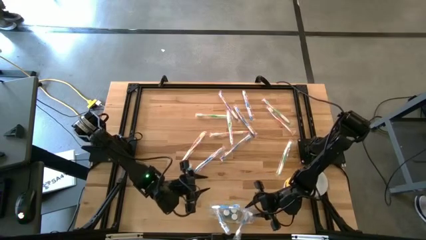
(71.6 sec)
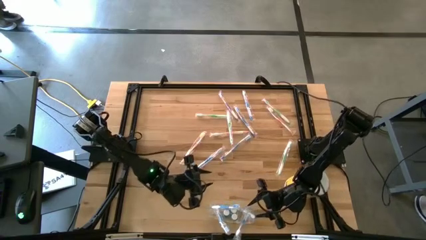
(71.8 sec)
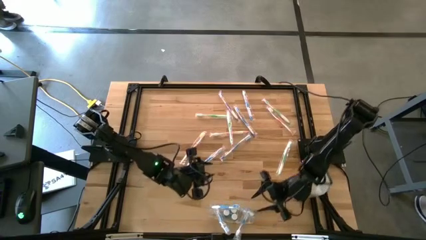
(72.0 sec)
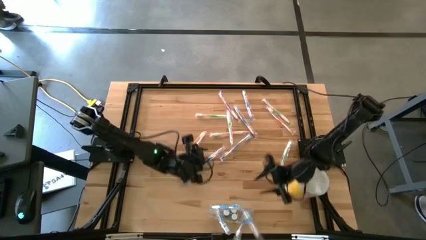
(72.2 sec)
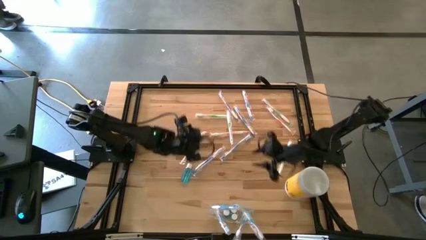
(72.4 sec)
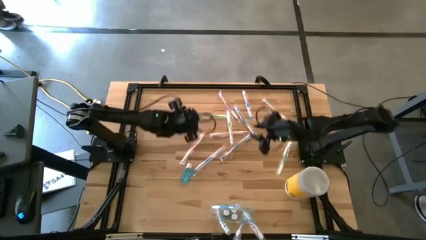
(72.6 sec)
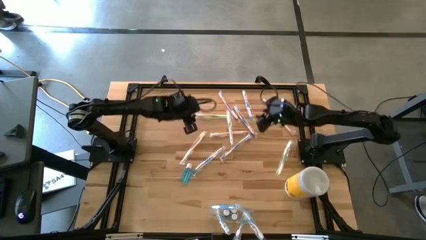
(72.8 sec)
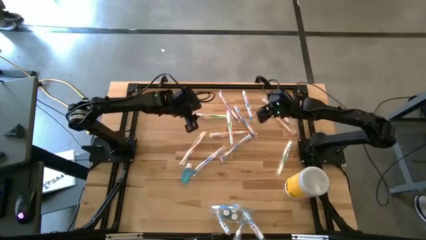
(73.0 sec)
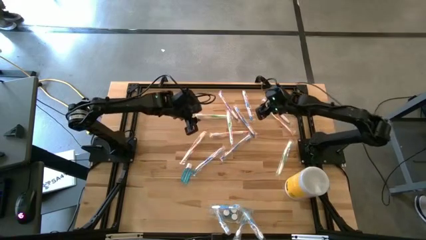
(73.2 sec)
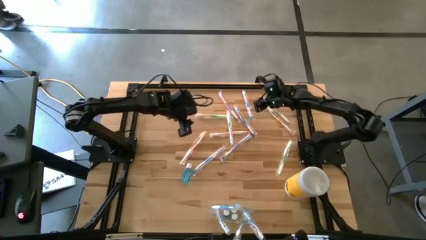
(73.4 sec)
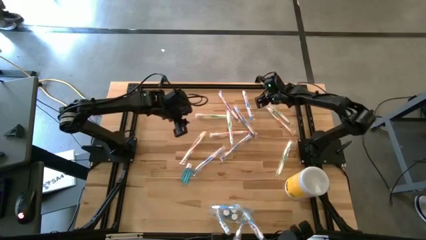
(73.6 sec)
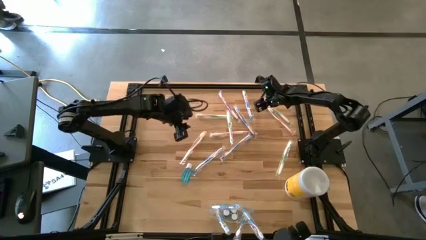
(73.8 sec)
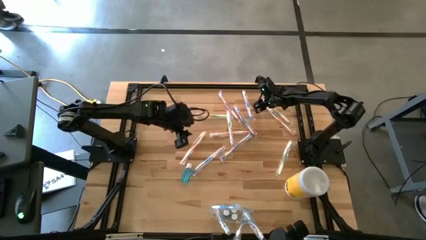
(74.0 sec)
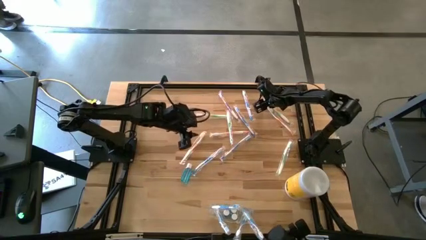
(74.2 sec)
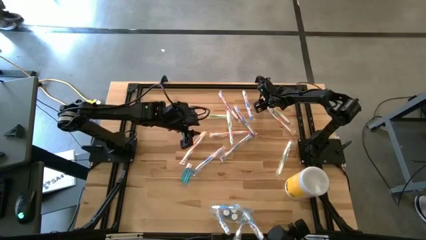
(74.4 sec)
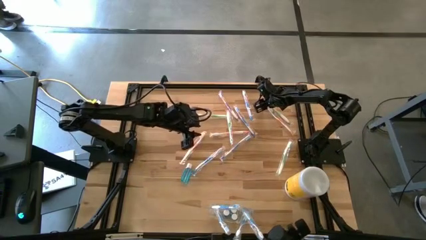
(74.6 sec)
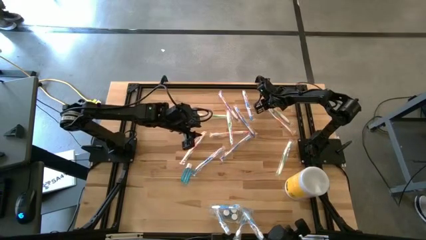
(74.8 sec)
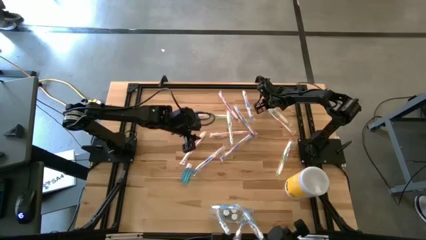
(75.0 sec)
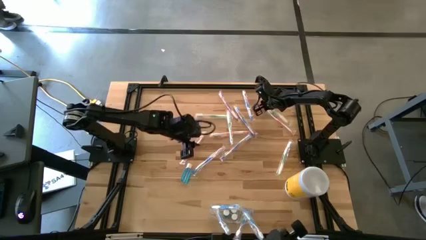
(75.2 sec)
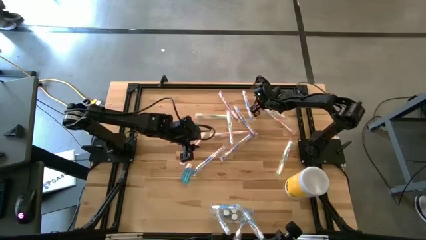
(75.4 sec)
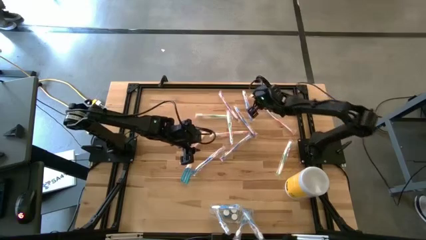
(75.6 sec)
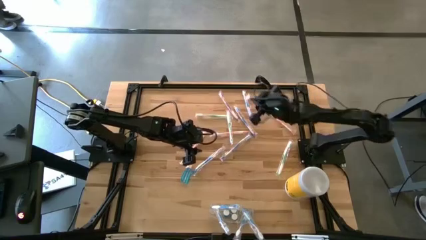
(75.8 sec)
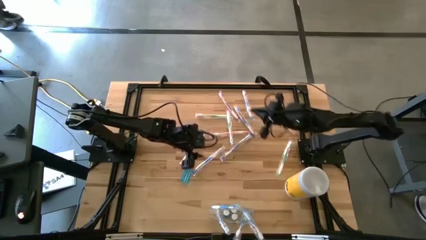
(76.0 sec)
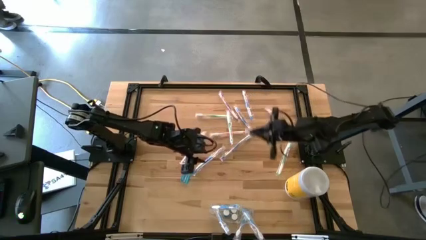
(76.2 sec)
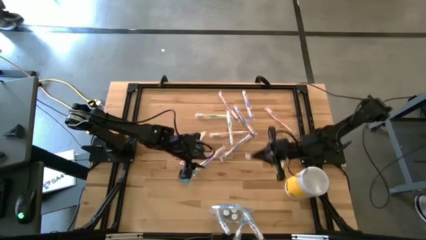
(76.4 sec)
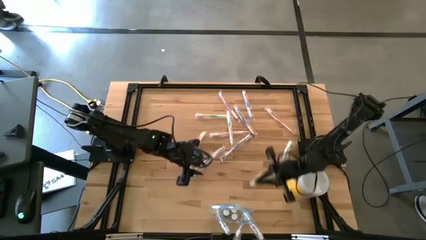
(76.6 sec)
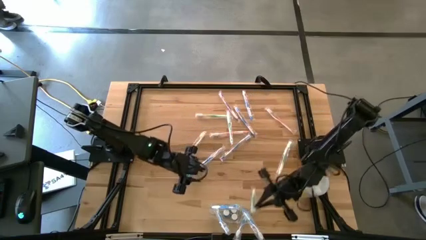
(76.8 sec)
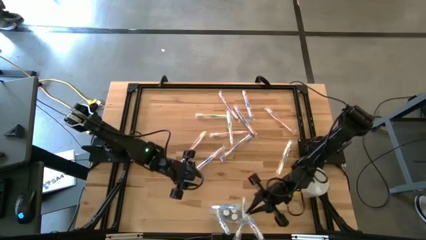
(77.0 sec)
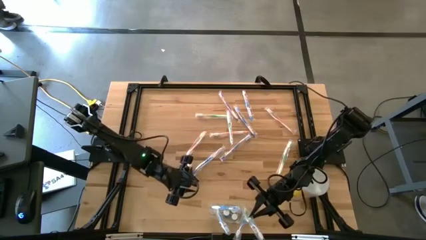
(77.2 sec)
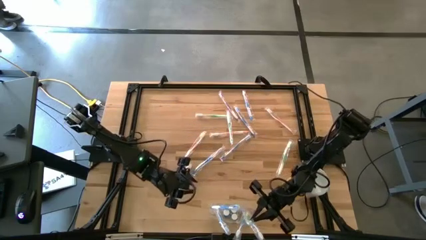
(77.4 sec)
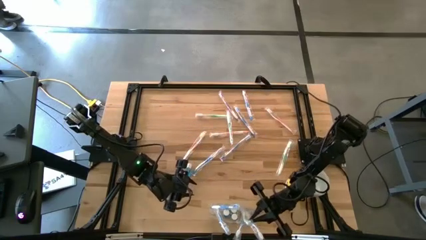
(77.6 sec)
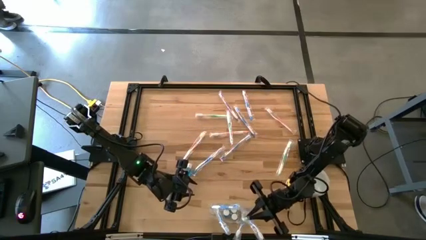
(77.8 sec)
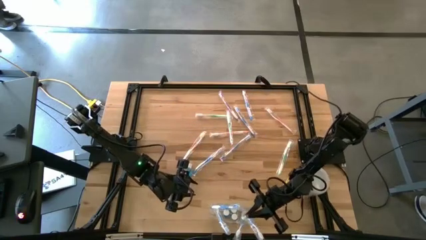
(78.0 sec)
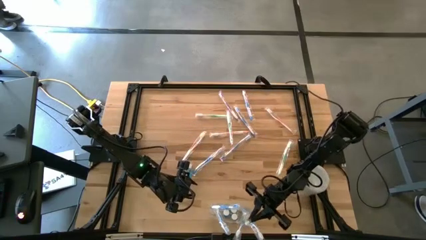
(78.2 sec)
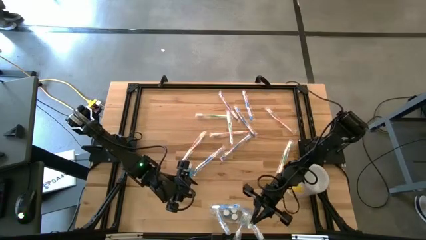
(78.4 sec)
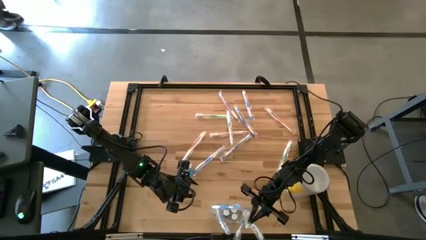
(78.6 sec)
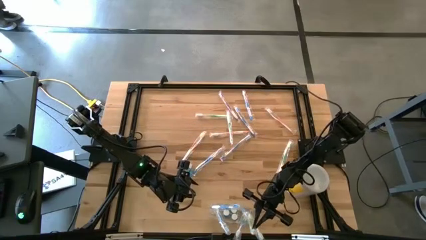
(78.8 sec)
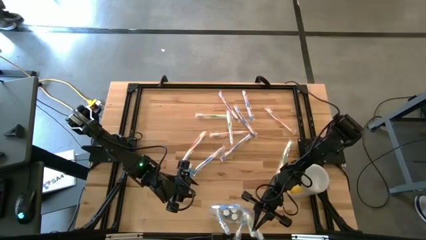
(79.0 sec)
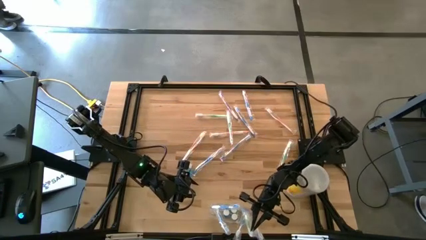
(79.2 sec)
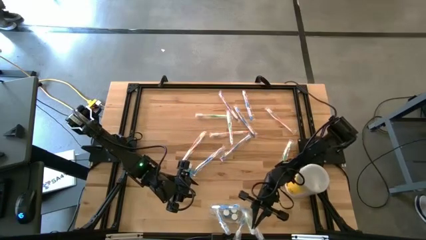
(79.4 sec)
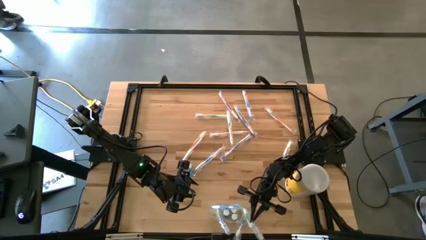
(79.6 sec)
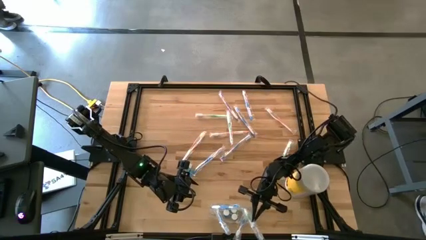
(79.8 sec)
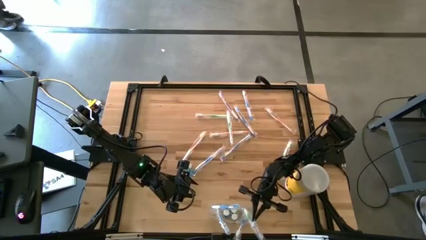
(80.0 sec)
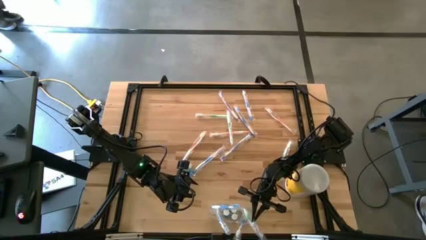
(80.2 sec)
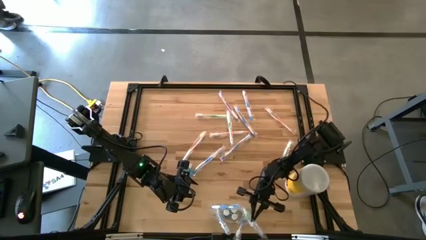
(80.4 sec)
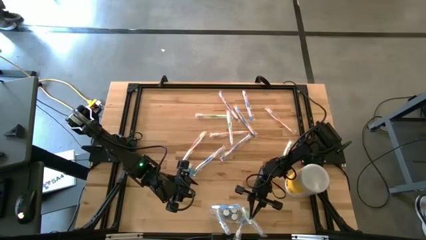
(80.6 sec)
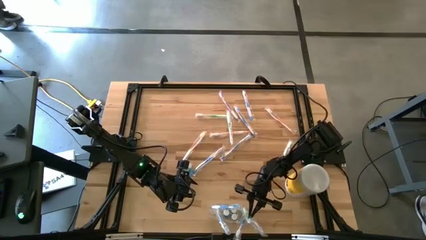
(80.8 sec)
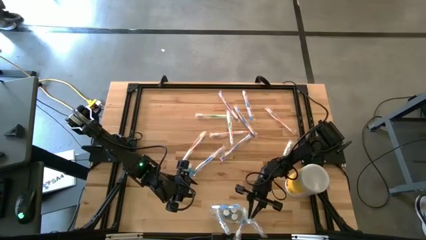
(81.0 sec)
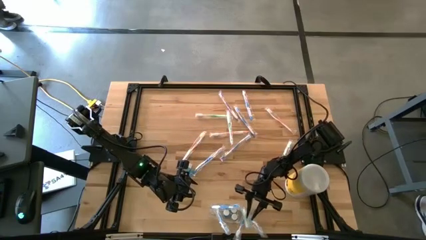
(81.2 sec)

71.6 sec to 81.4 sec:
Task: Pick & Place toothbrushing station
Put the green toothbrush into the transparent organizer

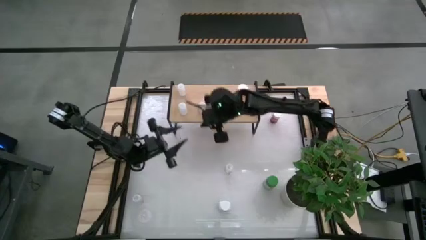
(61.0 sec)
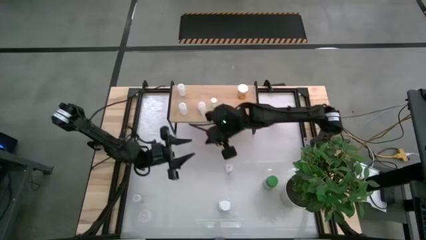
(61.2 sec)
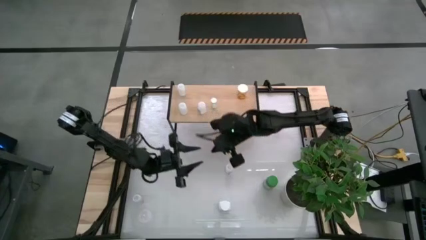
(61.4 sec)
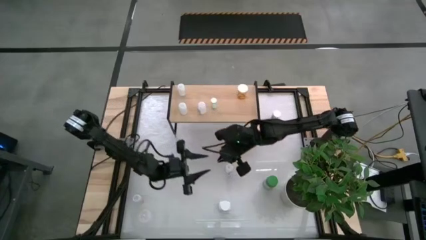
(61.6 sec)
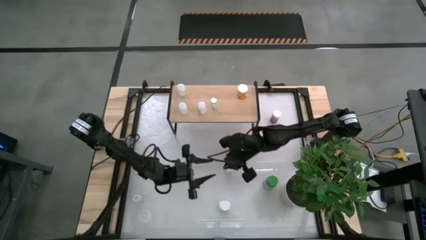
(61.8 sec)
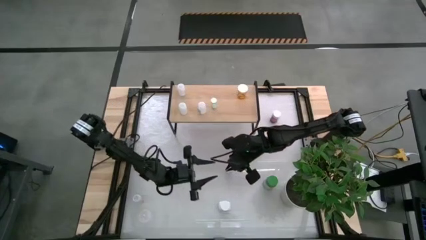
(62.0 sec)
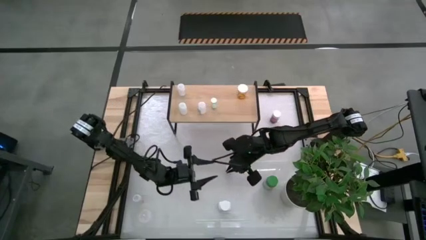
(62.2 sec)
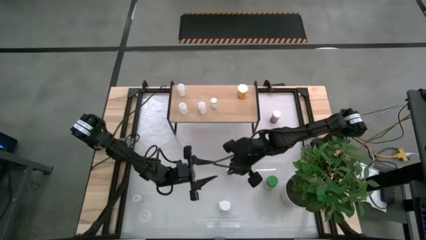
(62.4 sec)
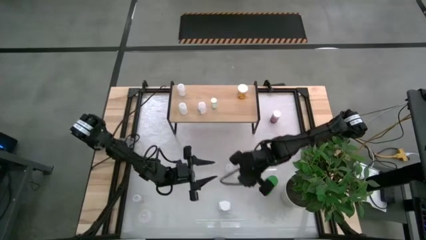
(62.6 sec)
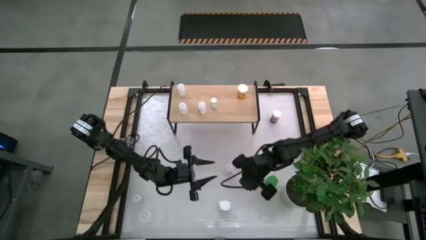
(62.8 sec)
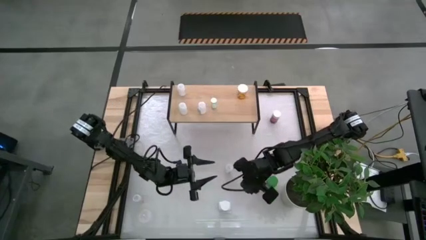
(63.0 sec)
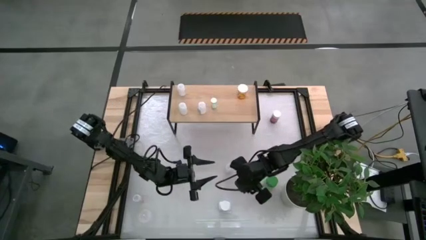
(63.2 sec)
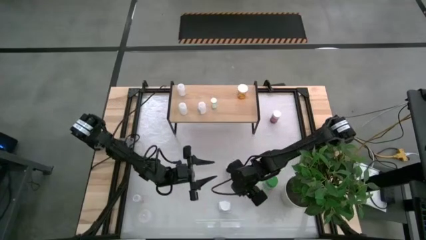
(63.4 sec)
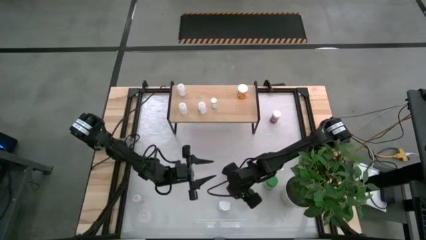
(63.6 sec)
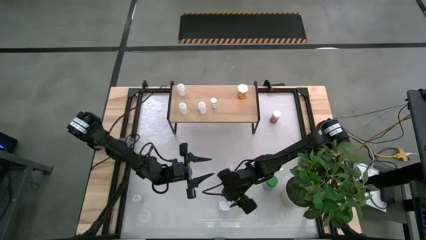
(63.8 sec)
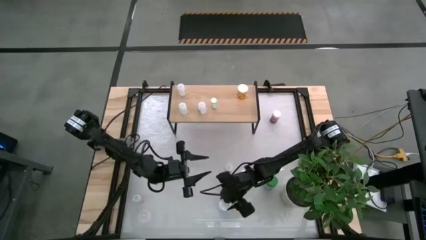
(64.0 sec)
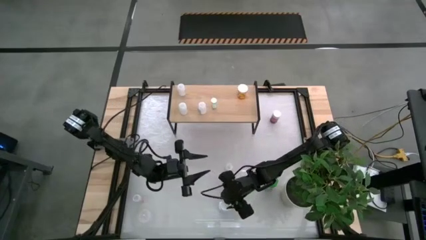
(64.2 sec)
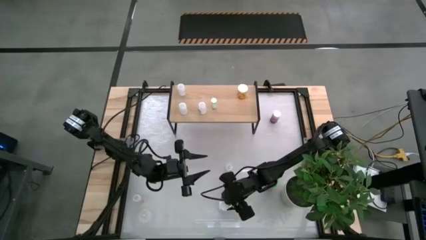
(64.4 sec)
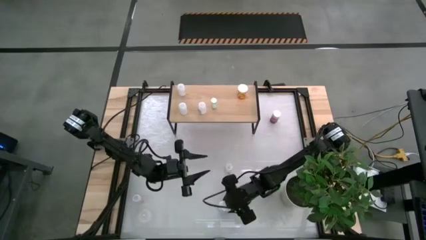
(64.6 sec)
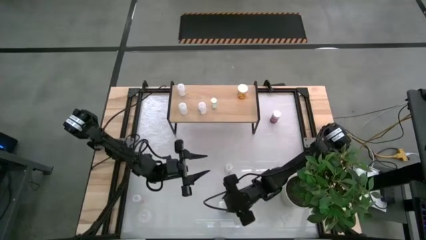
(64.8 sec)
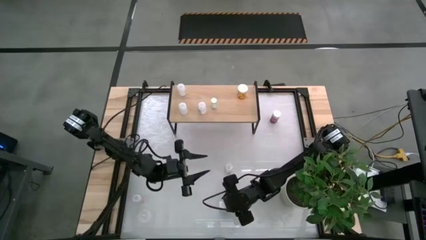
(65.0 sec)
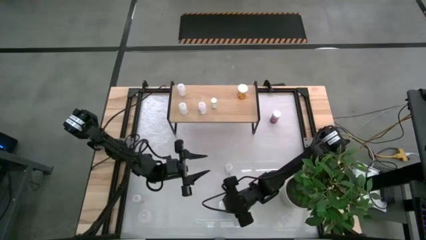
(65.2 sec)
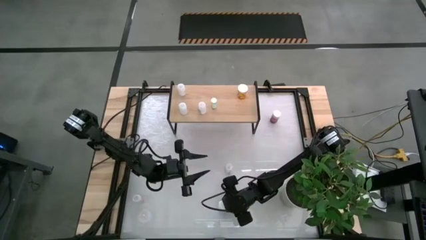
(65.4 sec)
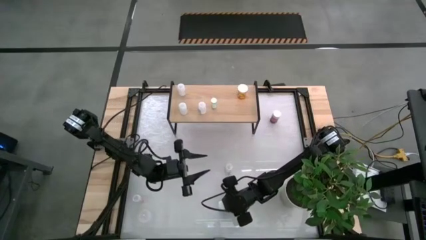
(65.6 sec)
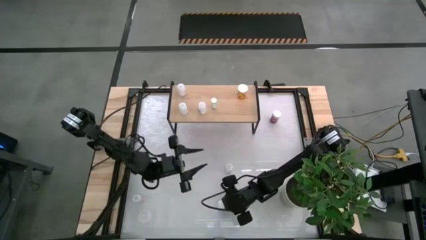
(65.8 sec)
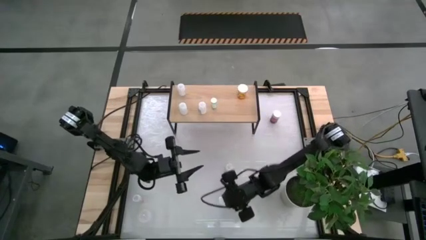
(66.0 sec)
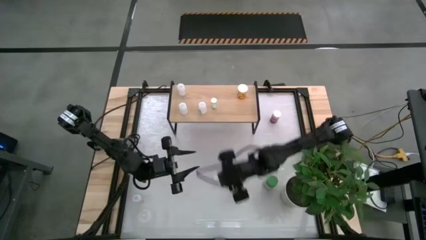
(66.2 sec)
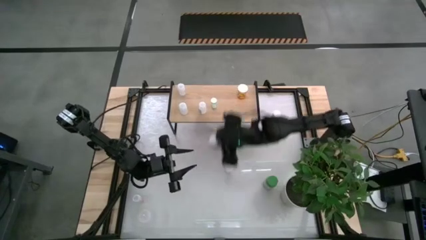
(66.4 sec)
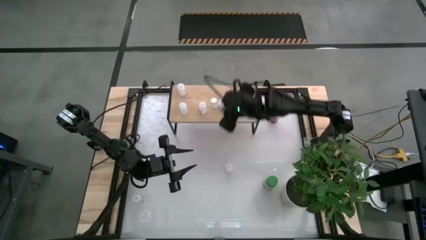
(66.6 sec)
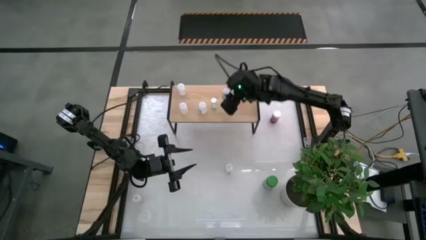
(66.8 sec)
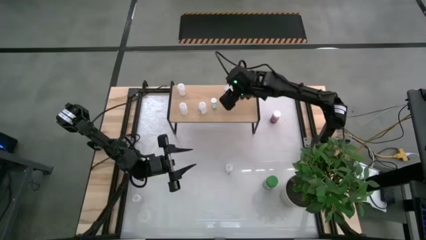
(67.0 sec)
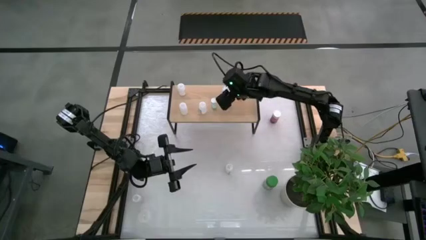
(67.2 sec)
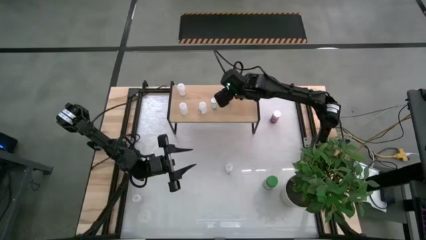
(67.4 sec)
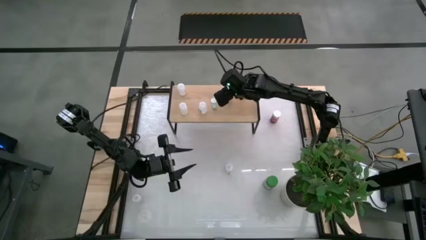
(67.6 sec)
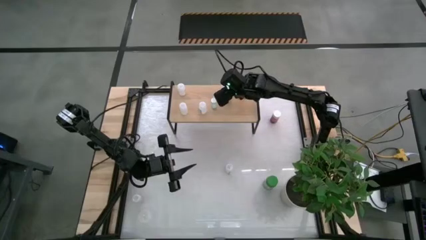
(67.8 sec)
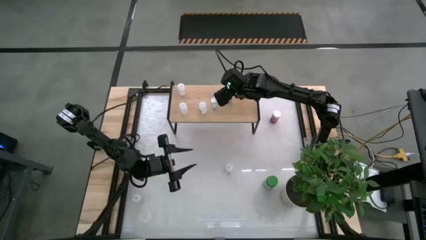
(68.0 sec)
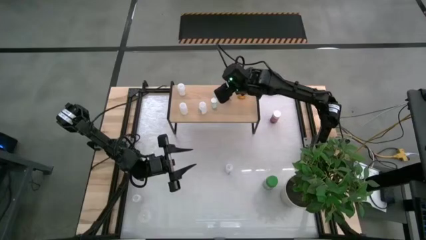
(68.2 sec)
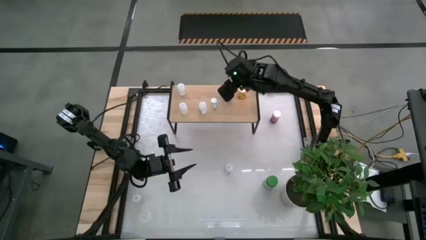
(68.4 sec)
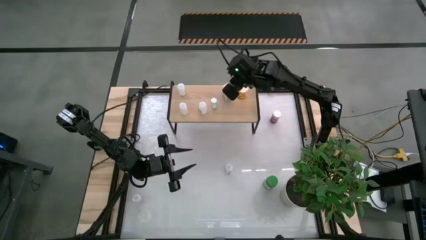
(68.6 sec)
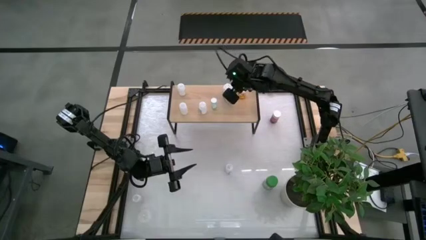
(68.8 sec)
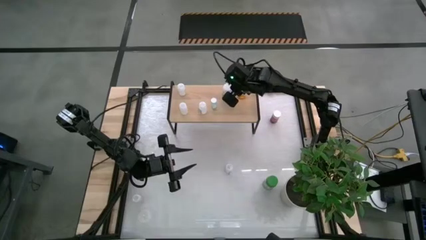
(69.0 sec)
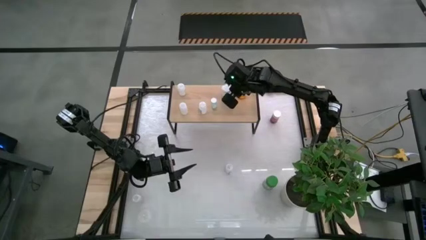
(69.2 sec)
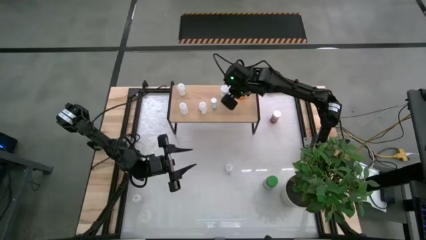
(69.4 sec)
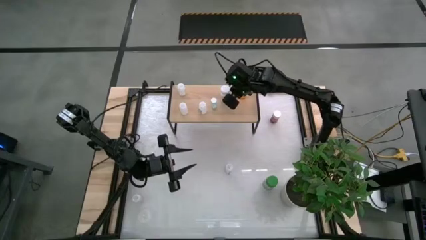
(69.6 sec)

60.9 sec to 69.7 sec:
Task: Pick and place medicine bottles onto shelf by color
Put the white and blue pill bottle on the shelf
